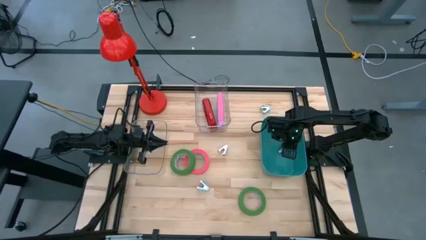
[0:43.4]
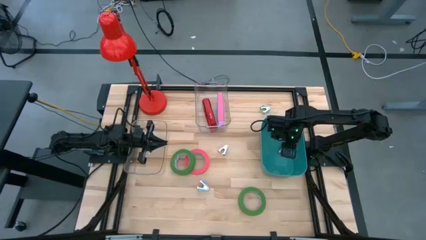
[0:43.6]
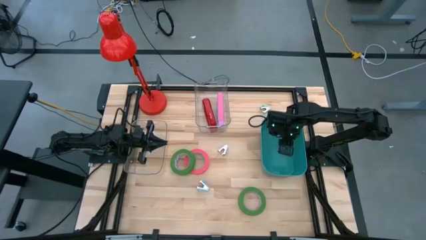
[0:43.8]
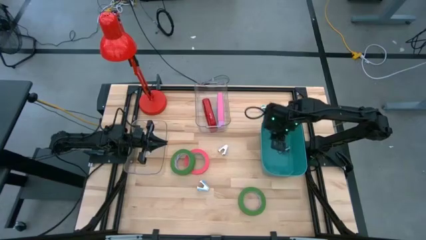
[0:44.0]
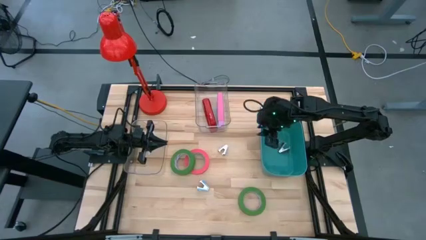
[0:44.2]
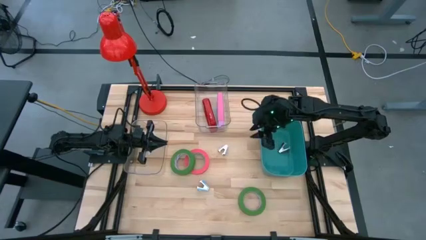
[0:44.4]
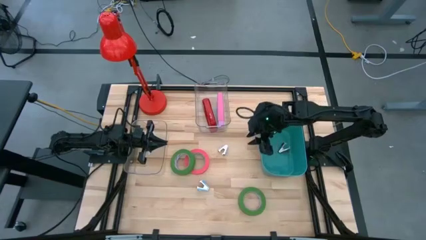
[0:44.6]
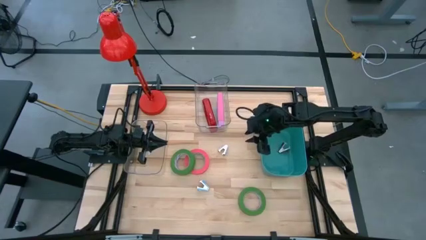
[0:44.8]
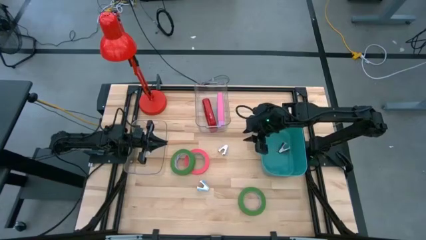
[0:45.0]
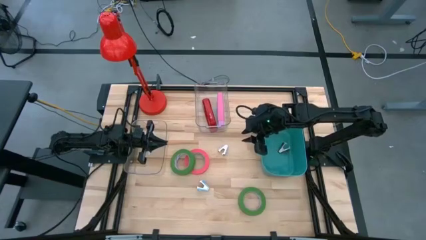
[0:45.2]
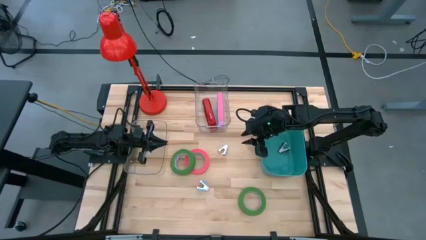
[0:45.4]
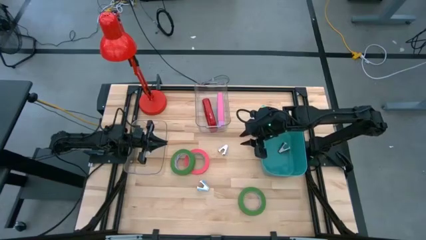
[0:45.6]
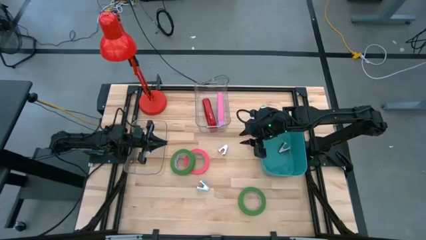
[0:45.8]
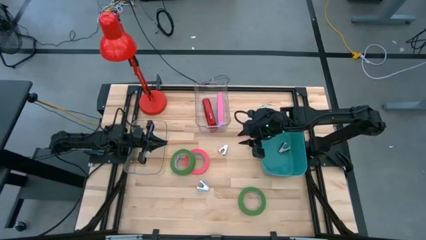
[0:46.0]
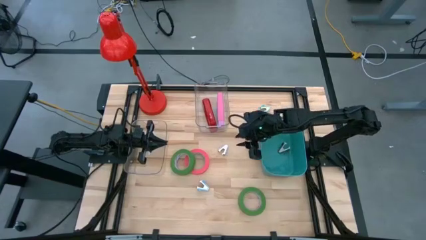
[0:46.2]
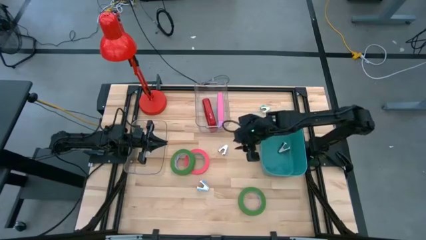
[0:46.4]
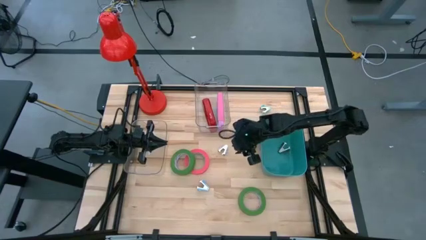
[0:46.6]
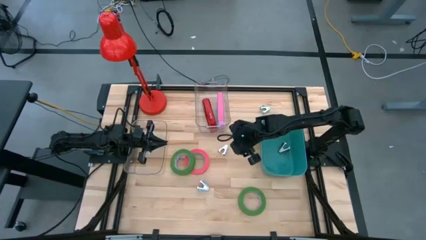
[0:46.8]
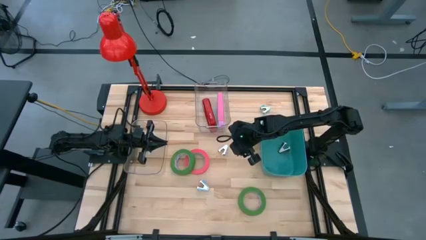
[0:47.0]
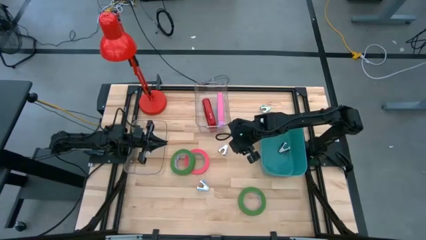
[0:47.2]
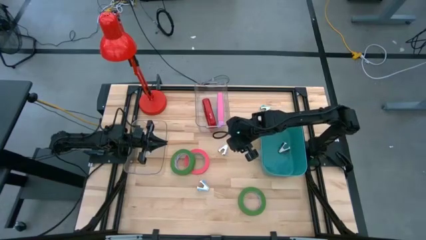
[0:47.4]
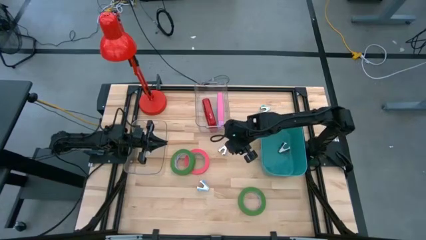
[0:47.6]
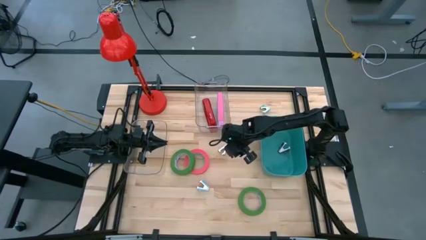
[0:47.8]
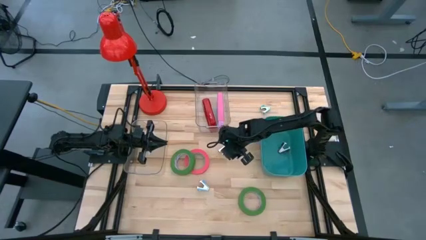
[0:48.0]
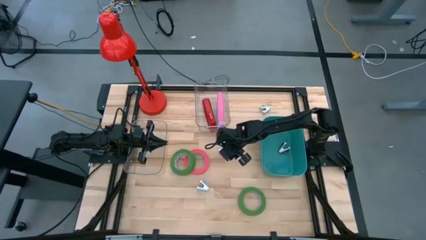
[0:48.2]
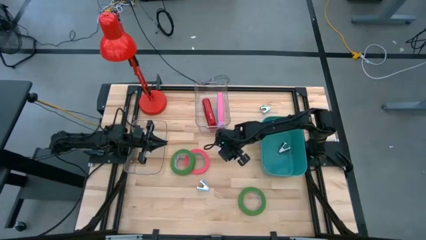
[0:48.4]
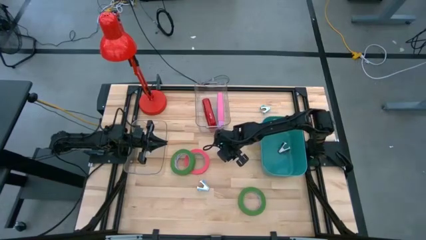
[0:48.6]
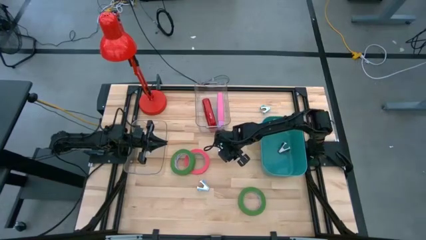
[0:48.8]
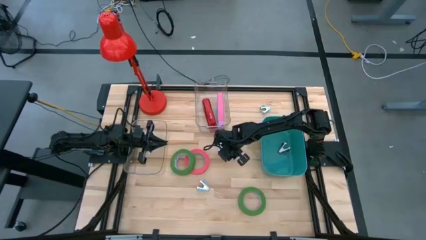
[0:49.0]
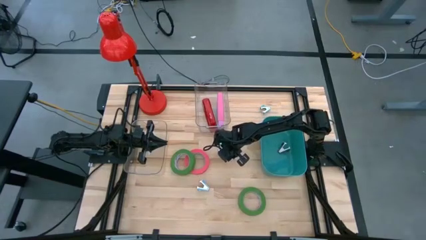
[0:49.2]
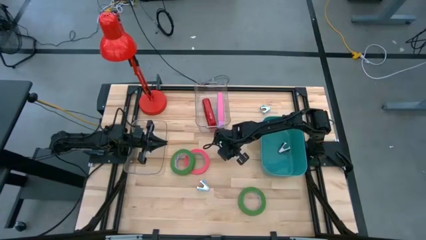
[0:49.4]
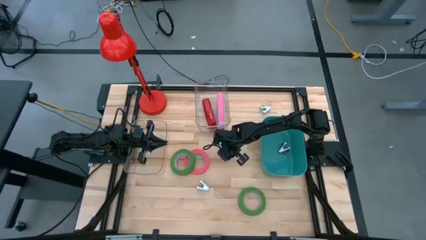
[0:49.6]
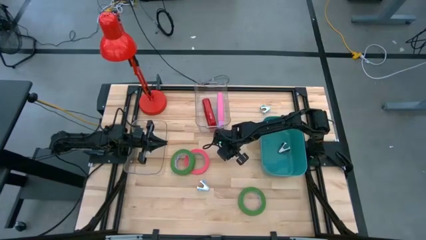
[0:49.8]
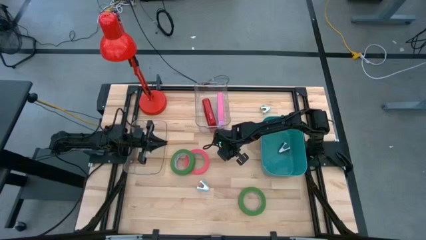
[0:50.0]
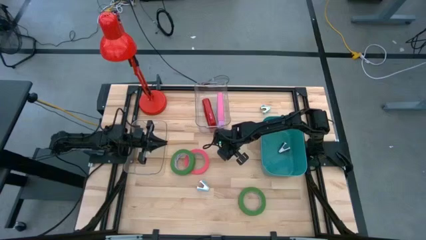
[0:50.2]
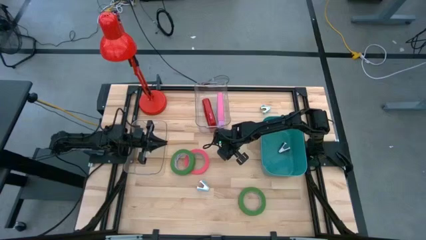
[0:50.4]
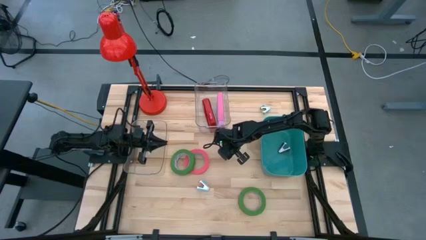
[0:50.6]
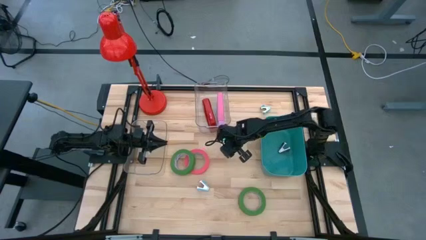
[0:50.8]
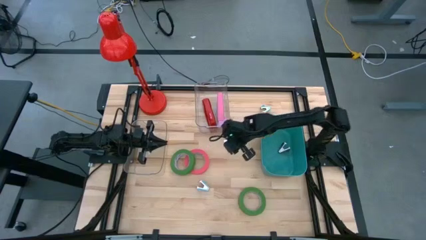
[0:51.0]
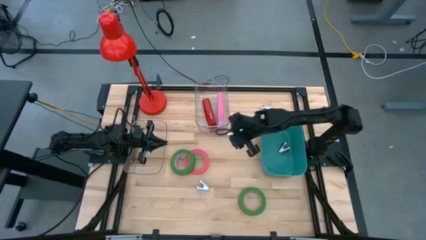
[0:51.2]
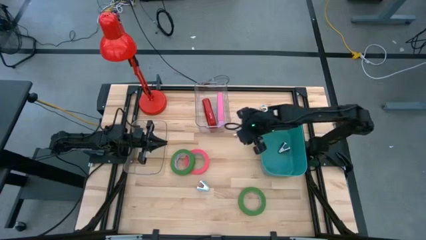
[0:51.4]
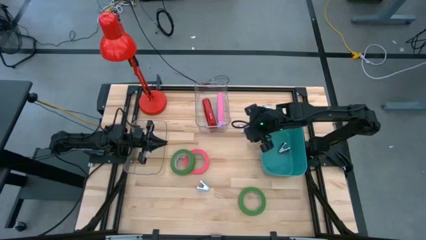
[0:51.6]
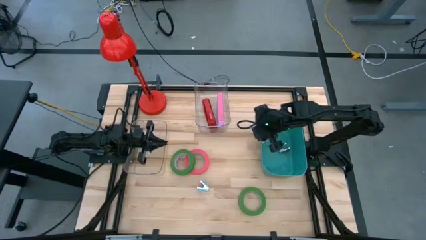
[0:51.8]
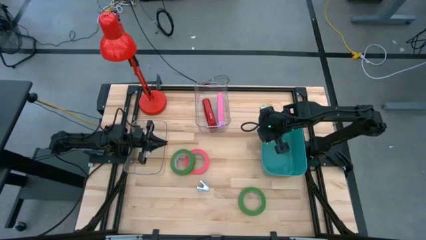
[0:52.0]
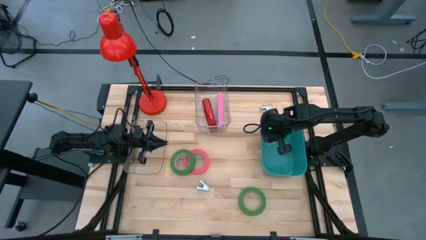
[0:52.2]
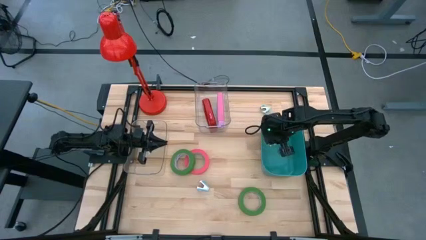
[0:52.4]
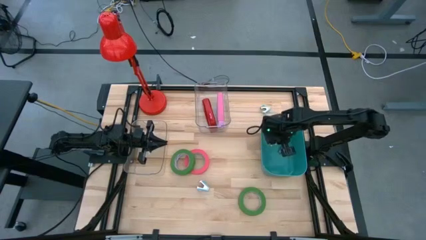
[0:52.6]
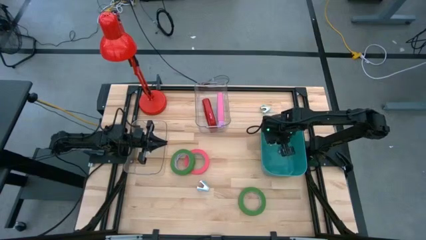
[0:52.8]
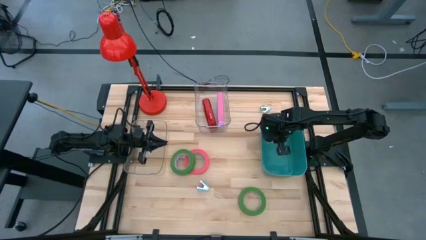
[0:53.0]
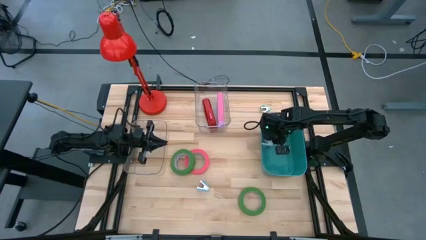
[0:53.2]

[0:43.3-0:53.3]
Task: Pick and place Stapler, Stapler remover, tape
Put the purple staple remover into the blue bin

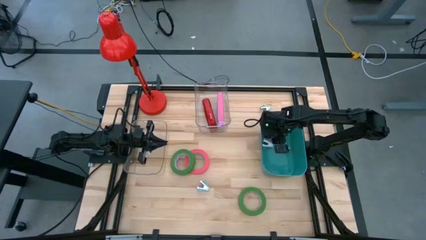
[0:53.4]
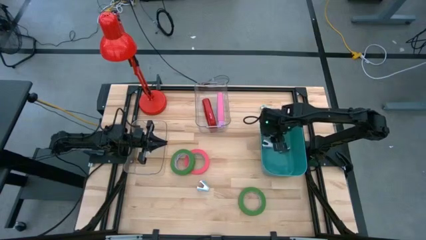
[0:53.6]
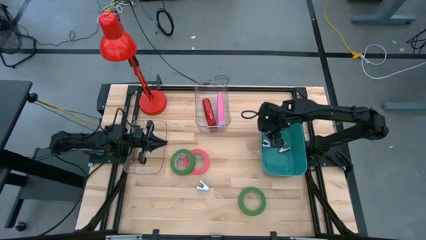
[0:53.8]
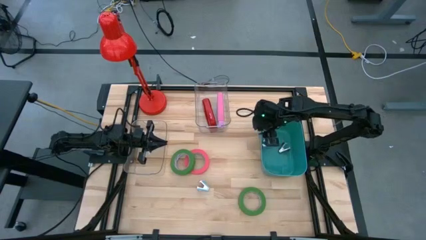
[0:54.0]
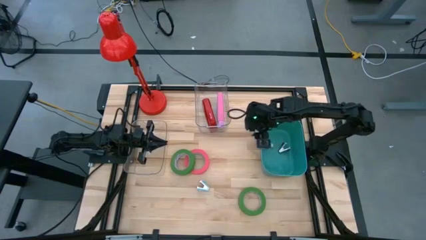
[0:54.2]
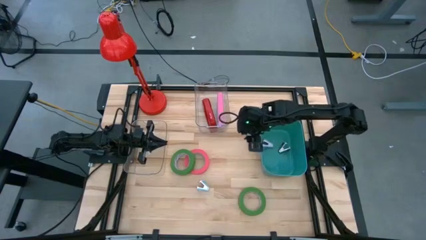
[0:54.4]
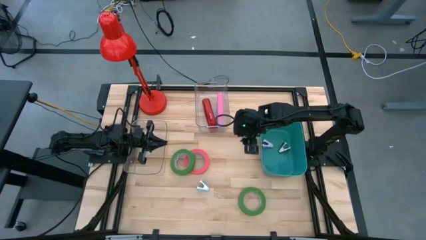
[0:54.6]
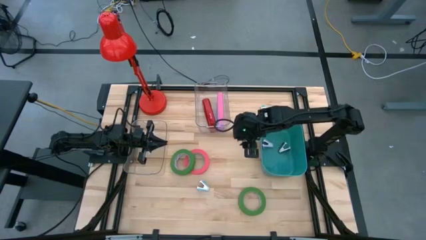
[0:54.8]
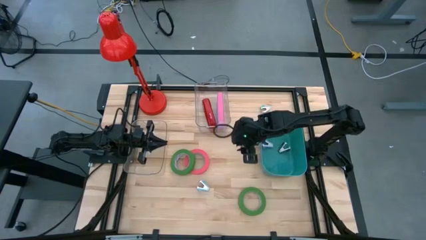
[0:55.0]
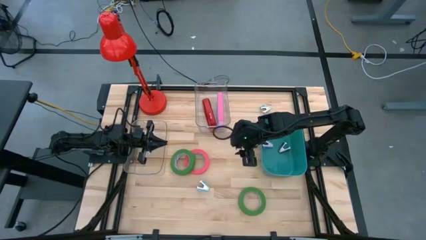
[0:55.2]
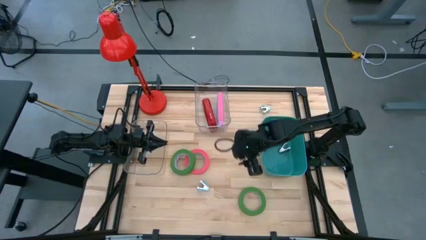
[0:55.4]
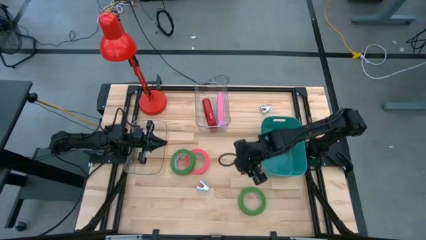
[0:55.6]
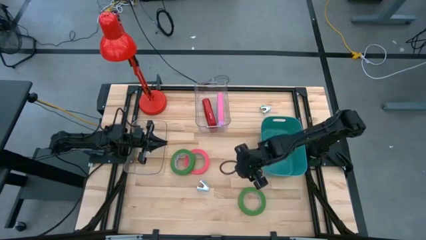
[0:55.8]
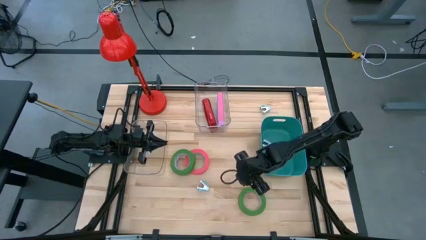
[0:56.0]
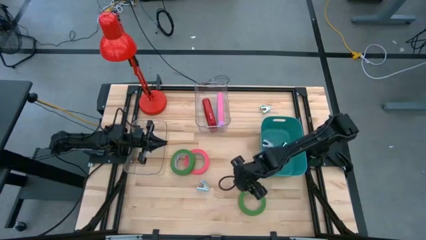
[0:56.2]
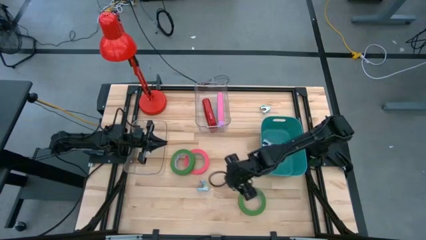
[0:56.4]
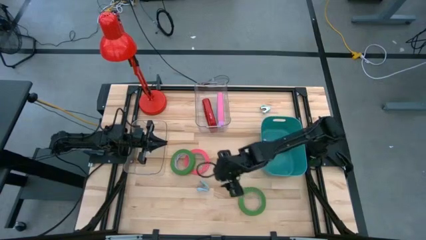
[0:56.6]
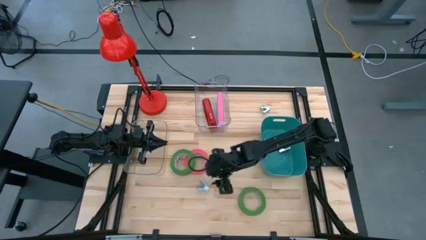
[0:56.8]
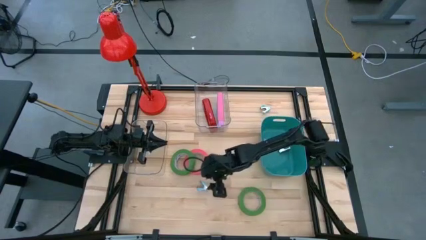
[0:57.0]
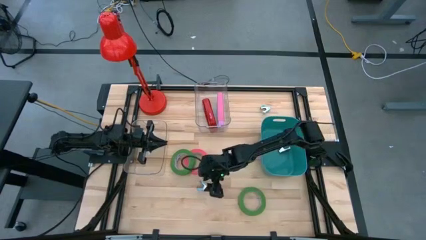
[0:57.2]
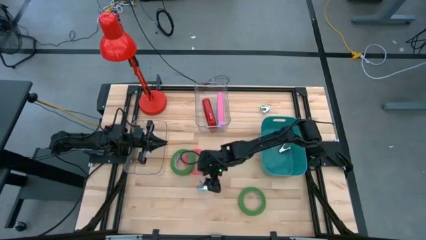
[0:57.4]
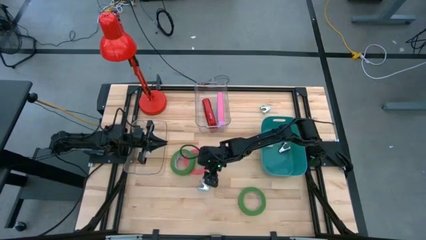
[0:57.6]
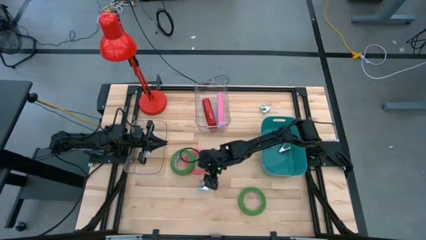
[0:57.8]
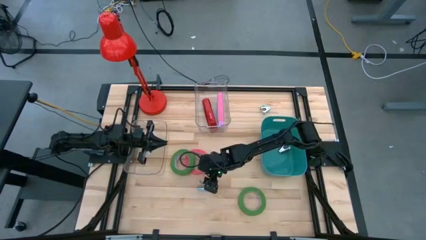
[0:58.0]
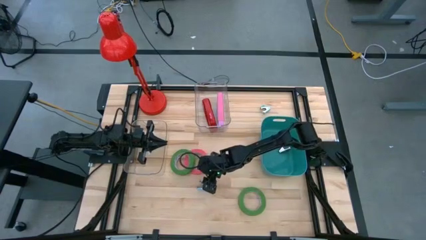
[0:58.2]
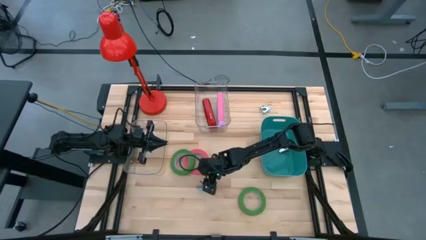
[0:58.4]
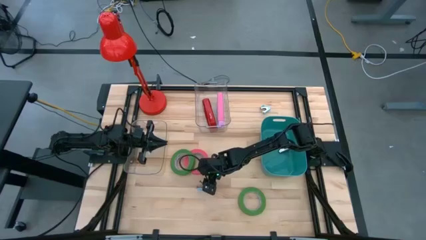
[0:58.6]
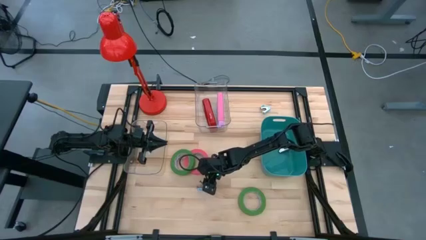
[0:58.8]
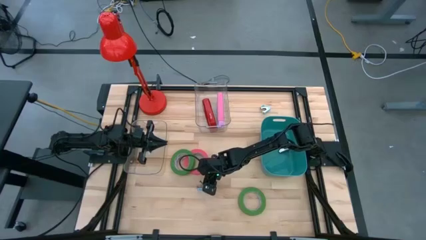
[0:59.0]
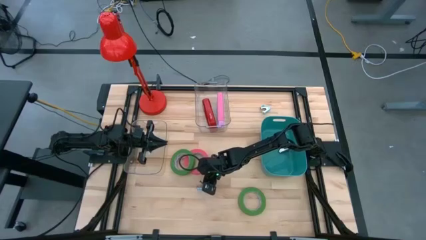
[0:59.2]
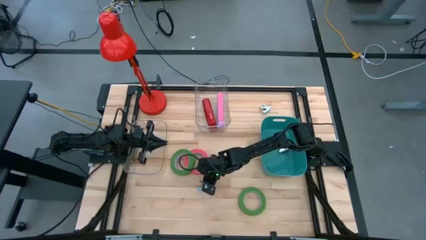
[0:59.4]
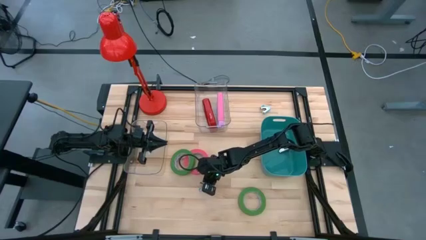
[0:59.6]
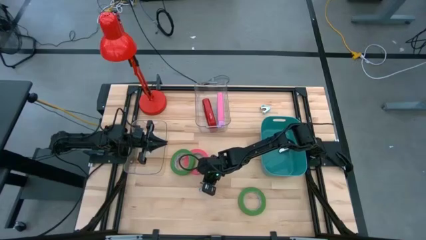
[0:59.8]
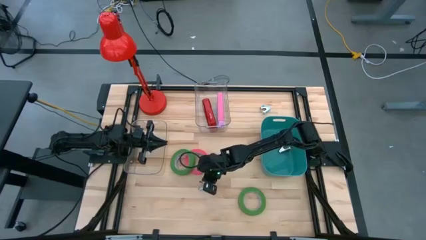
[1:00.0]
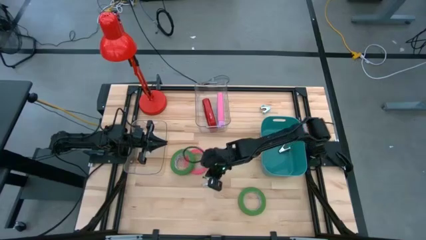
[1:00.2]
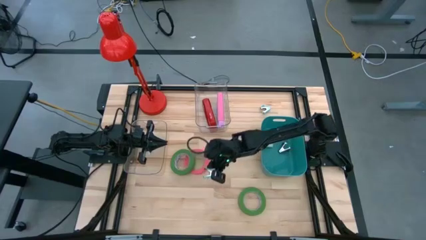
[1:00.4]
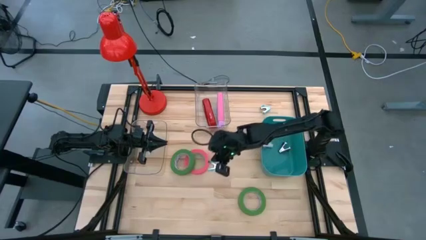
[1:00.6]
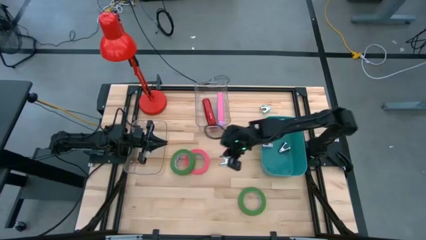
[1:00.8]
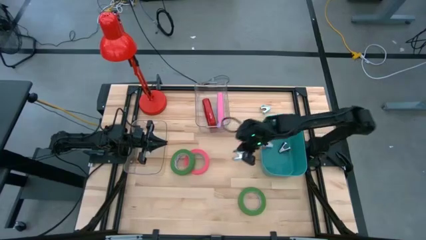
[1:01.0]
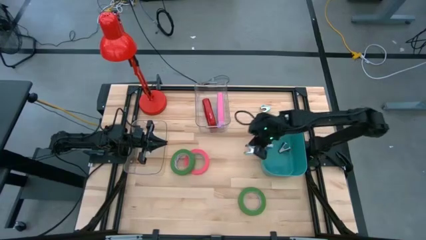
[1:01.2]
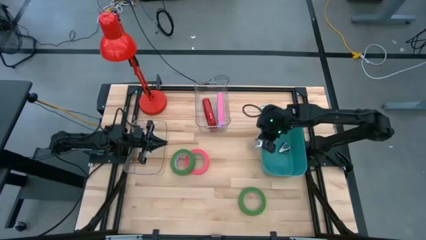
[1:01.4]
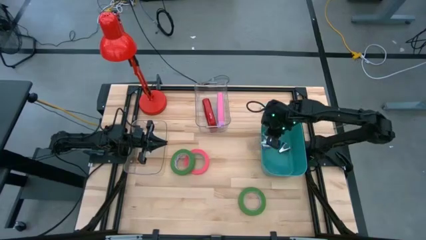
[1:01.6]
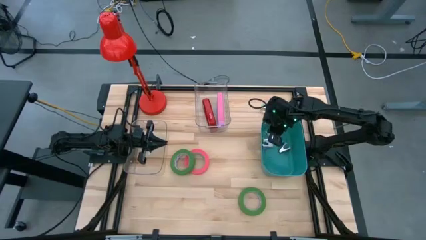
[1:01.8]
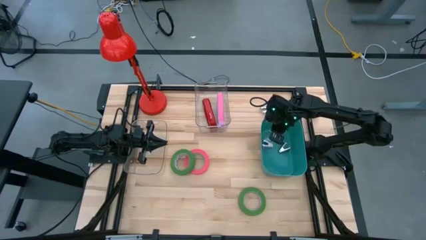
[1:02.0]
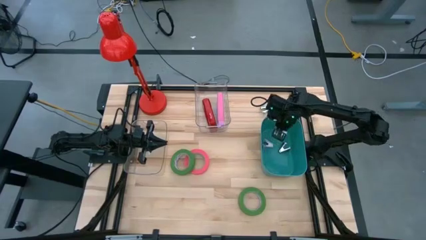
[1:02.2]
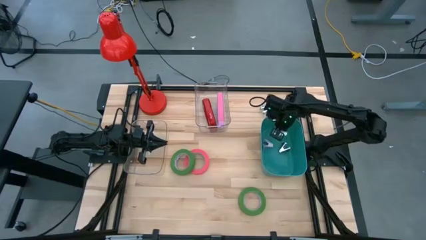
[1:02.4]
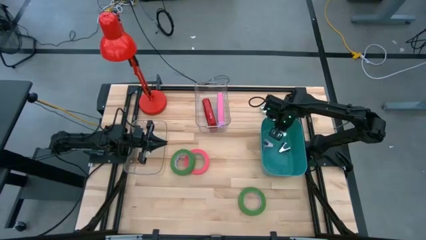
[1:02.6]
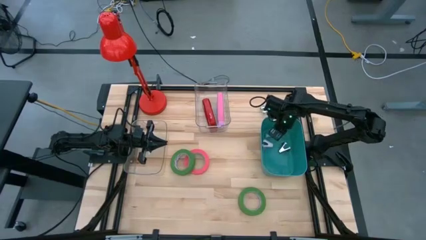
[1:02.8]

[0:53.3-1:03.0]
Put the bottom light blue staple remover into the blue bin
